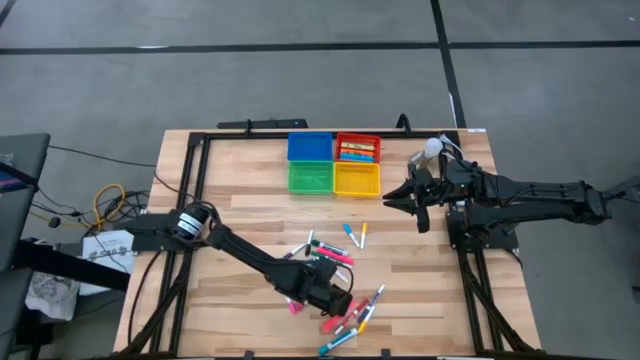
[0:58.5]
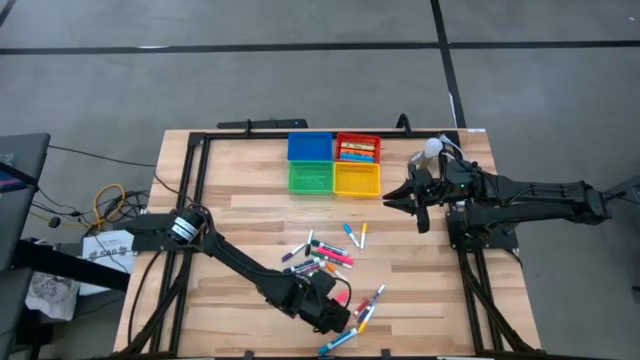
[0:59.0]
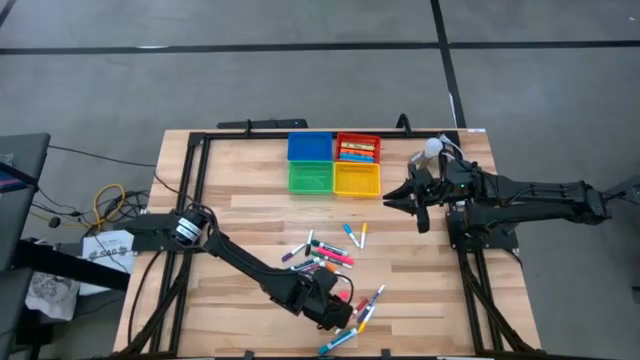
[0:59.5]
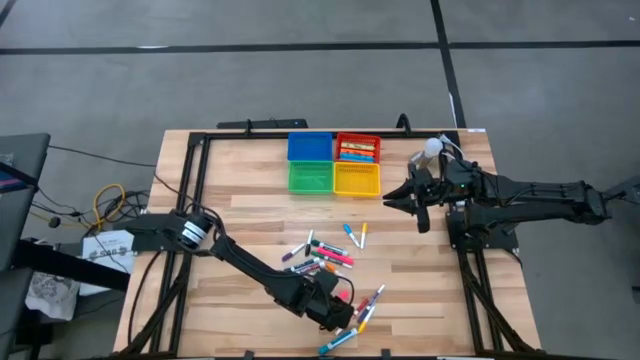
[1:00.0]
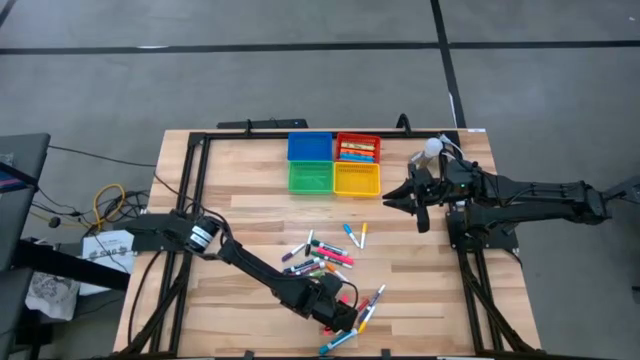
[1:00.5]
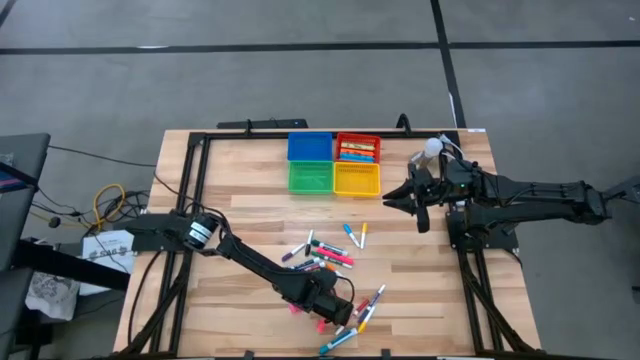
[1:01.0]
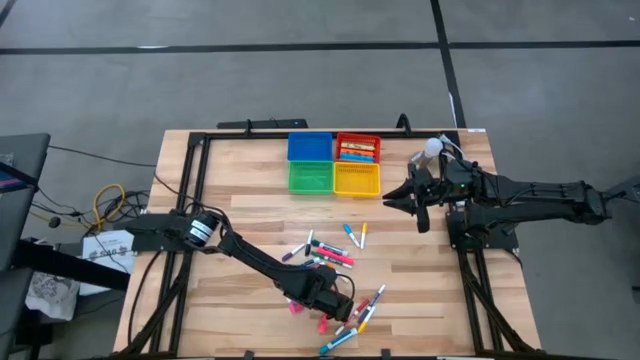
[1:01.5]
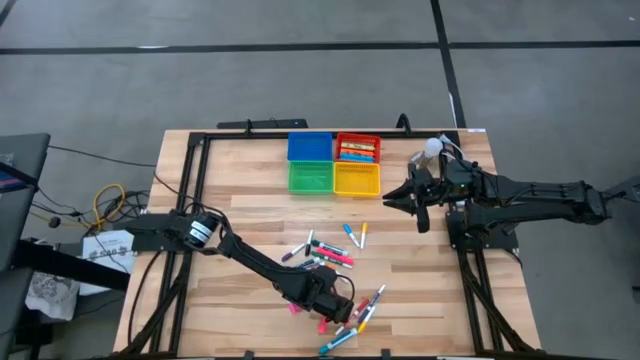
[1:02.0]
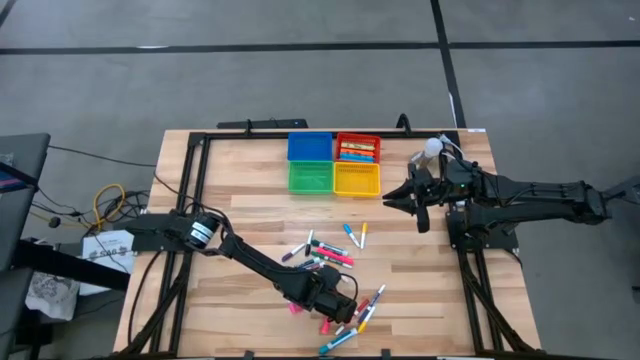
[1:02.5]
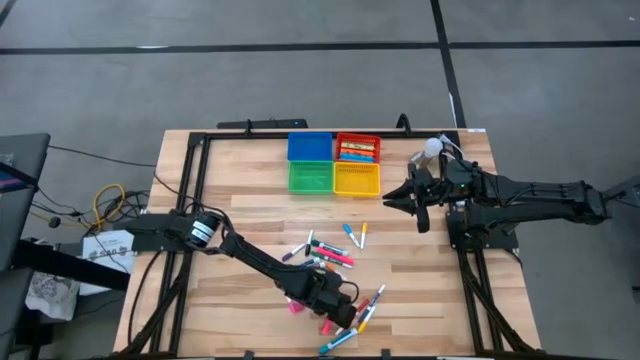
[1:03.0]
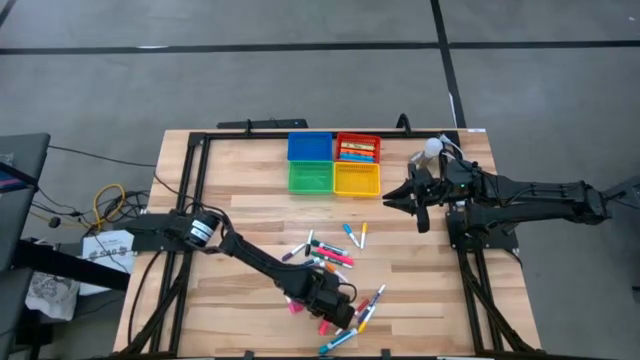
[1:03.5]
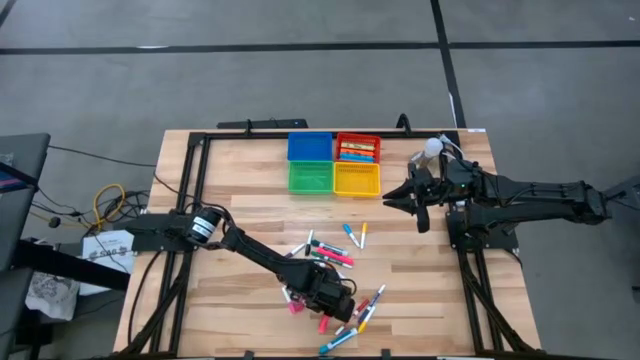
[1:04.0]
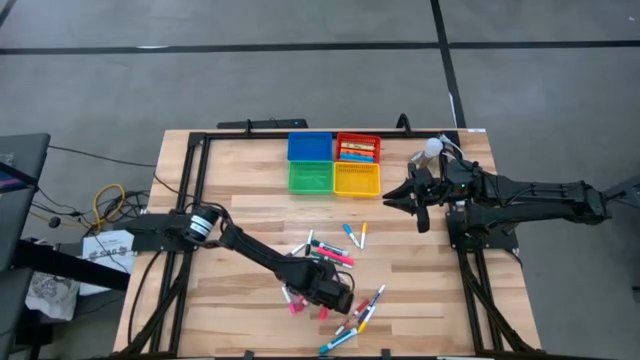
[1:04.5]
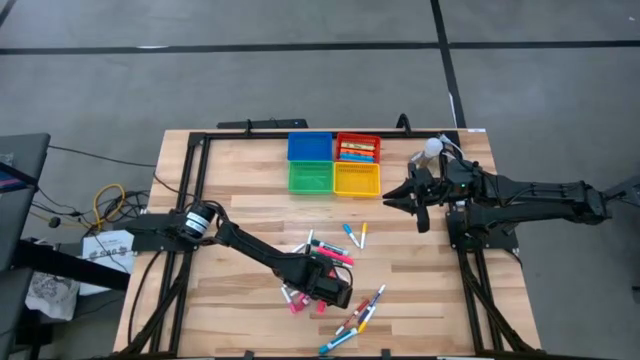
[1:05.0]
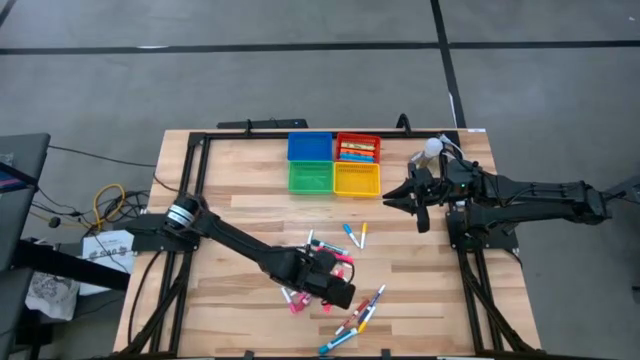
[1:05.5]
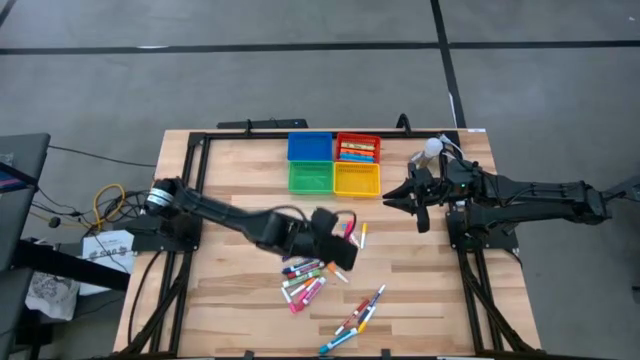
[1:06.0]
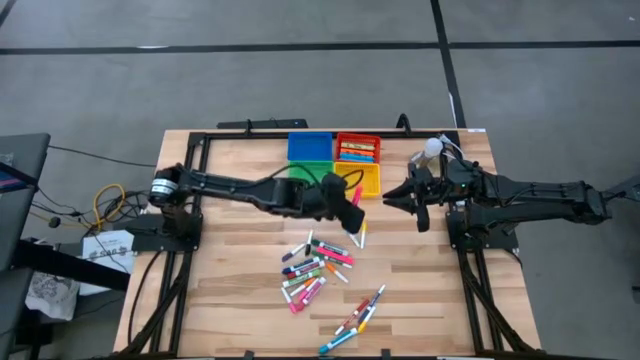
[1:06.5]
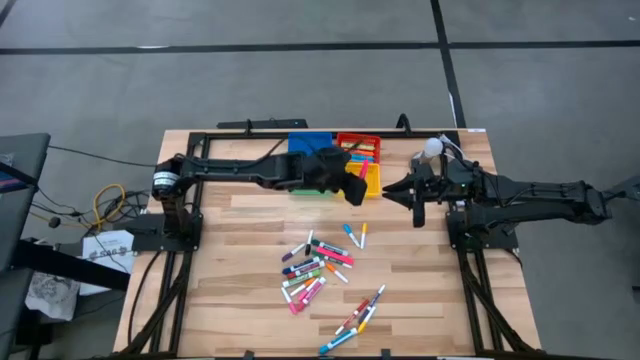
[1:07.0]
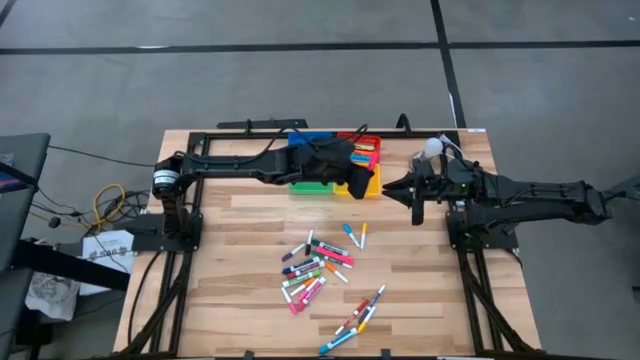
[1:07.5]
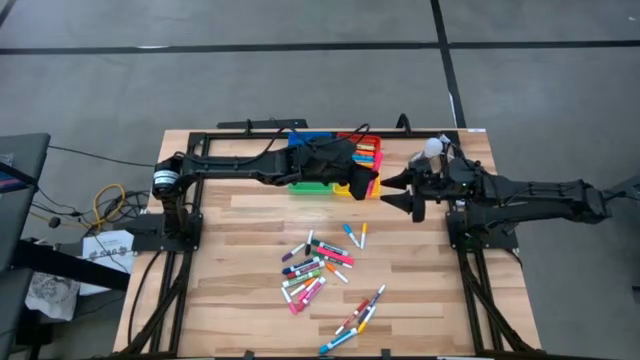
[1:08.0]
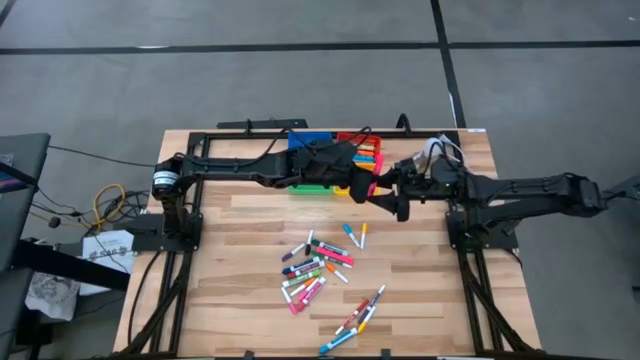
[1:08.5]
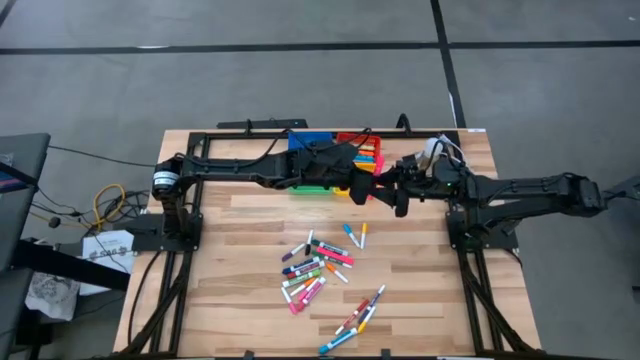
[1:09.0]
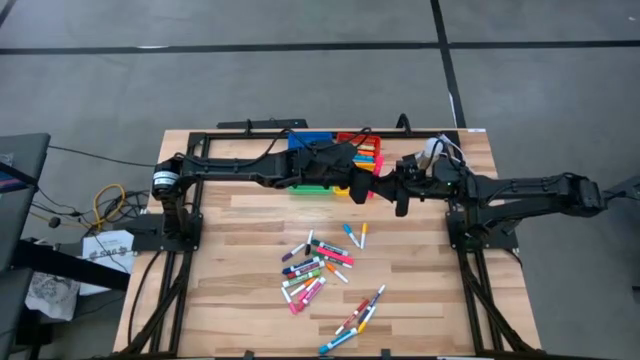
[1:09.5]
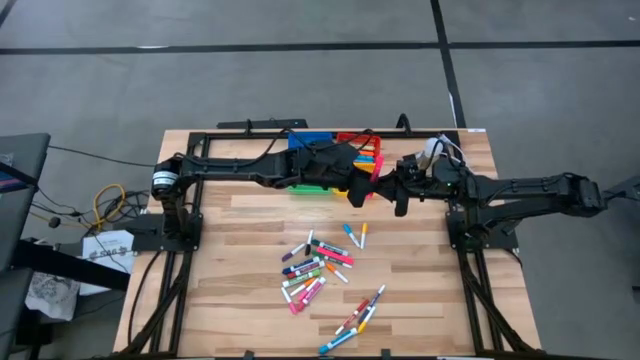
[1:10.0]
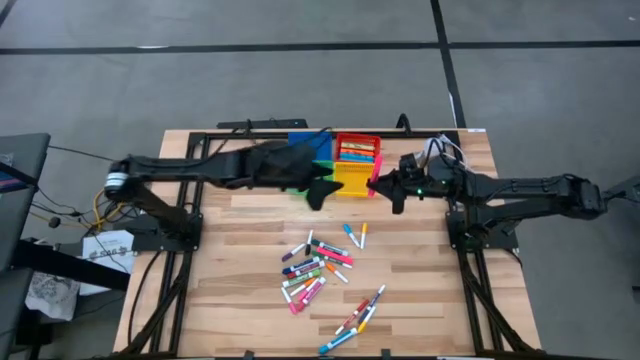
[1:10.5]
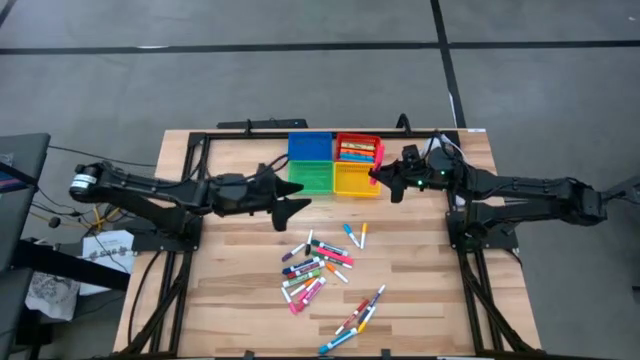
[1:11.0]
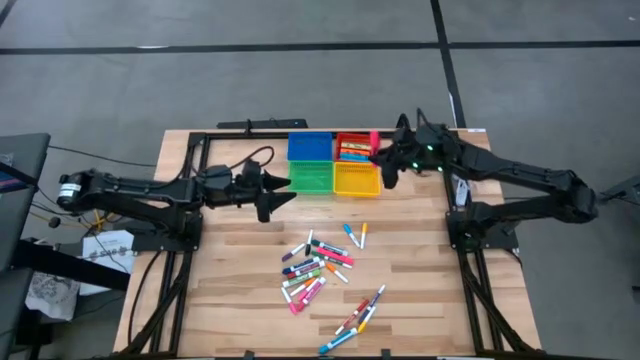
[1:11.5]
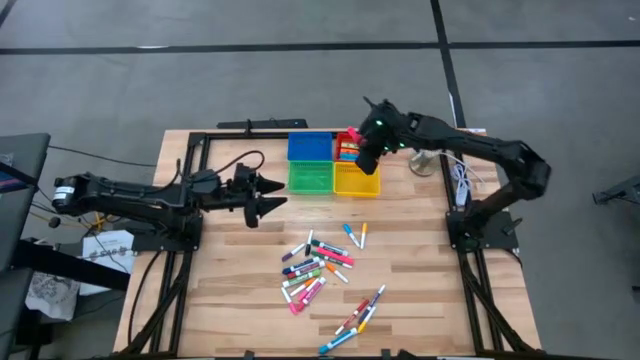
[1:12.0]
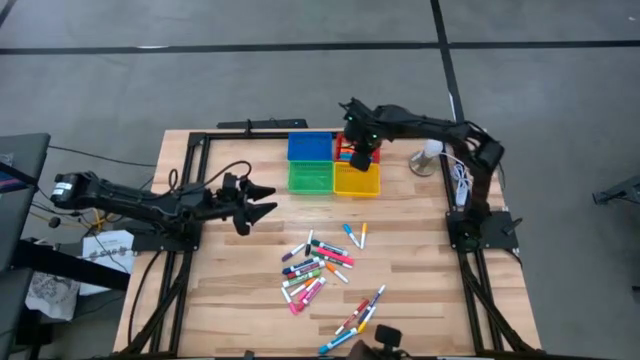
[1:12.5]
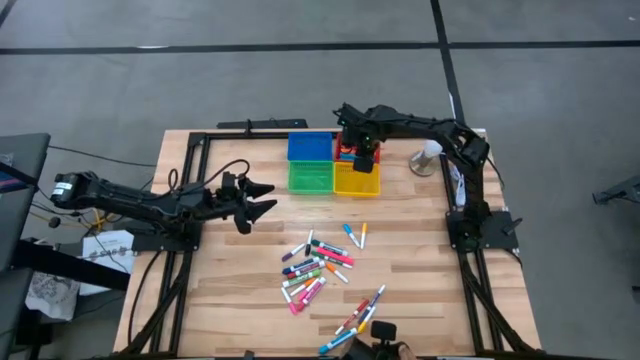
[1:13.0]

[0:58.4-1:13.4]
Task: Pick & Place Markers
Put the pink marker in the red bin
